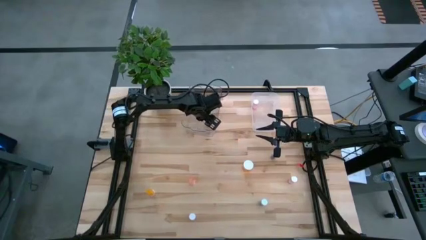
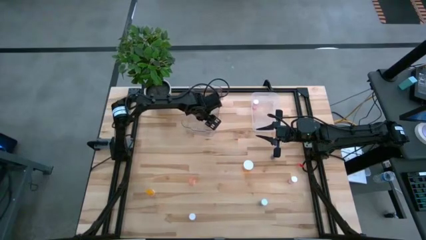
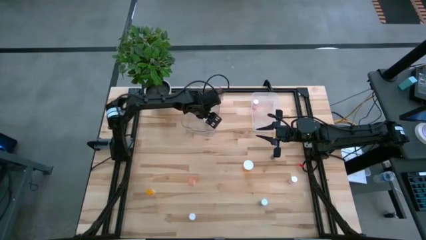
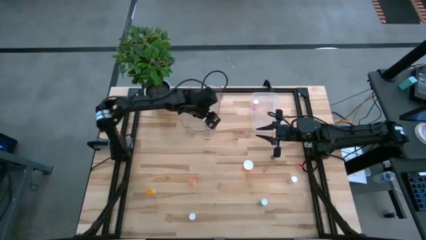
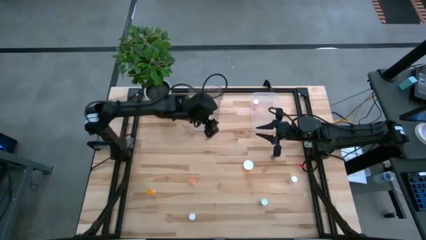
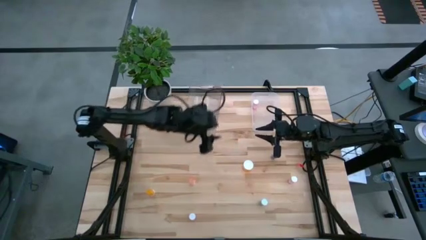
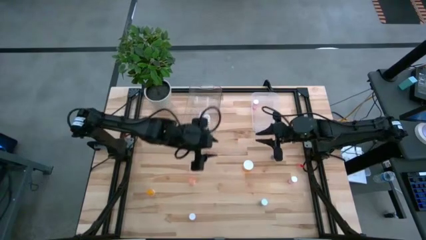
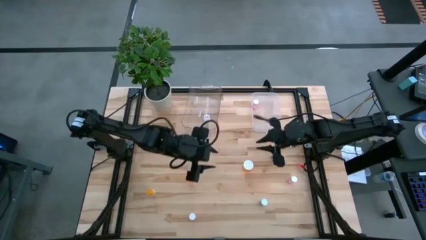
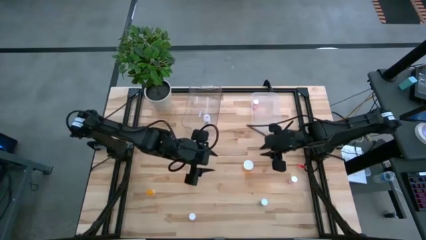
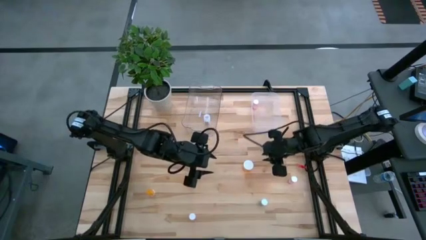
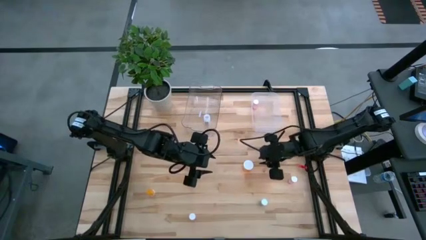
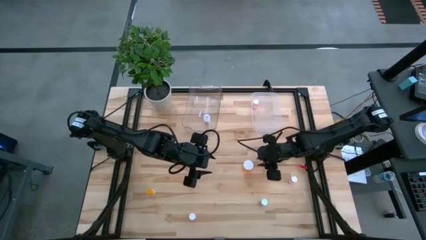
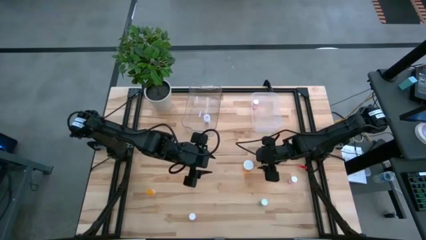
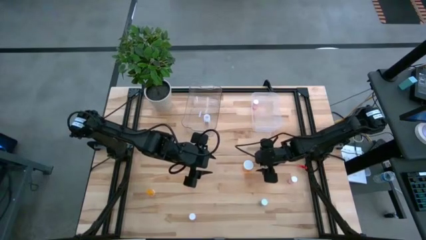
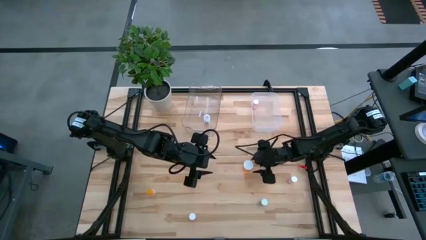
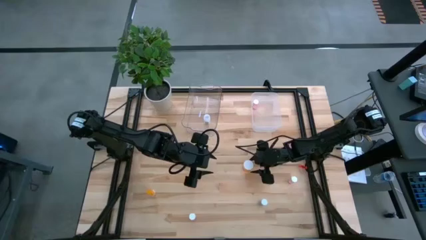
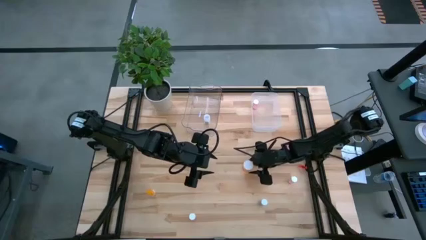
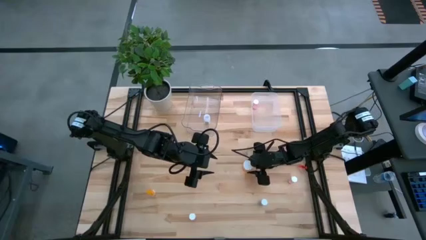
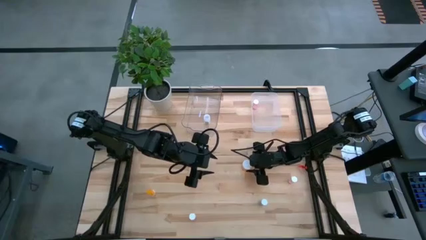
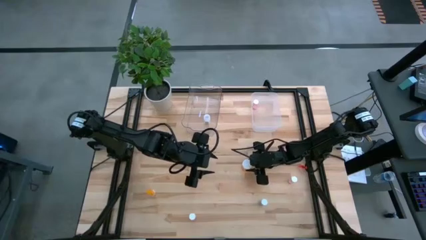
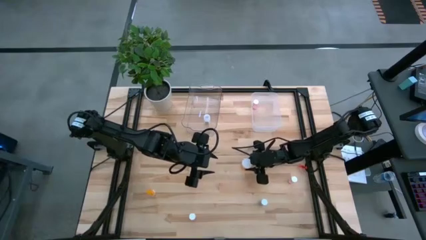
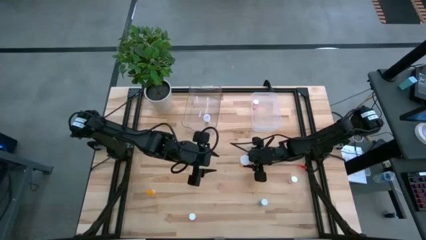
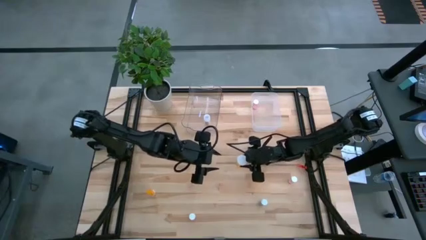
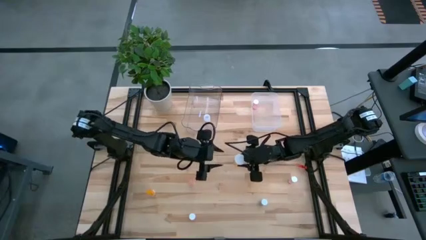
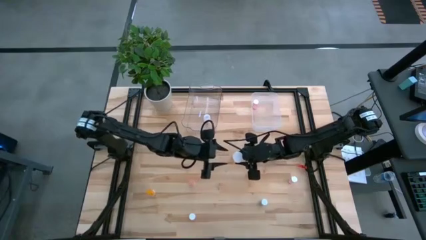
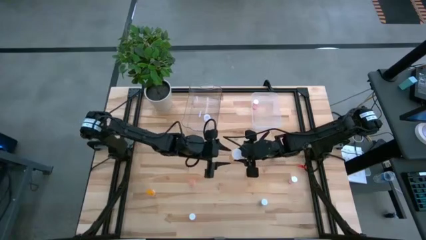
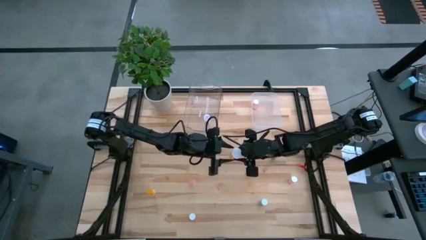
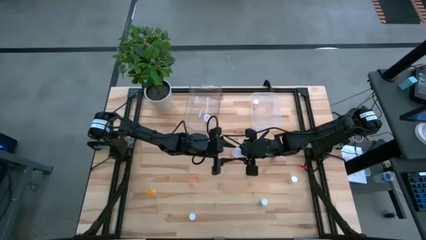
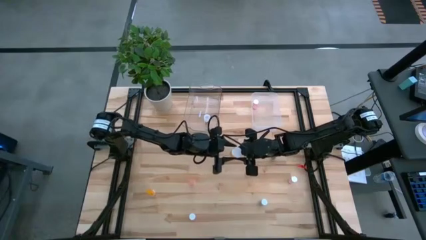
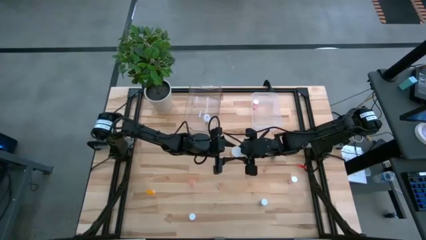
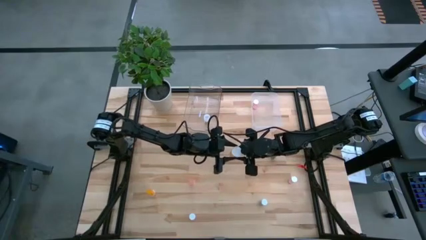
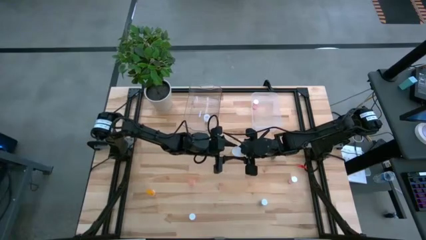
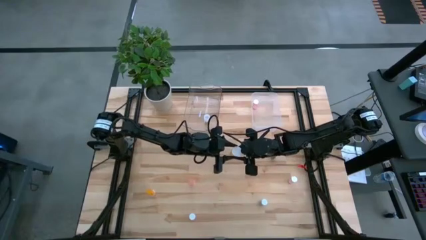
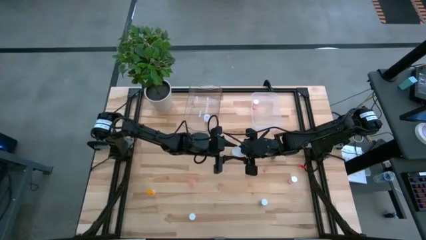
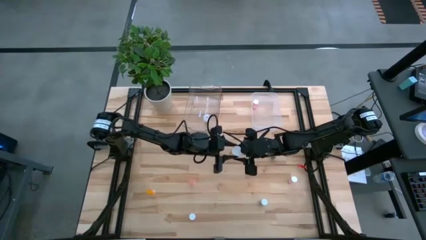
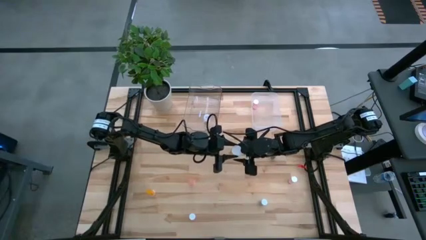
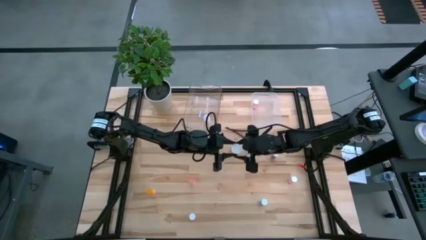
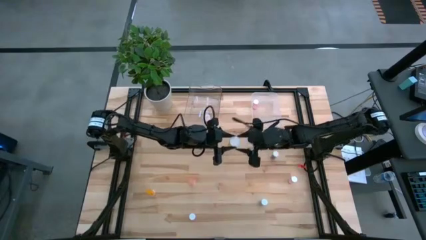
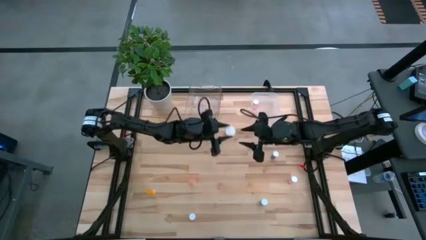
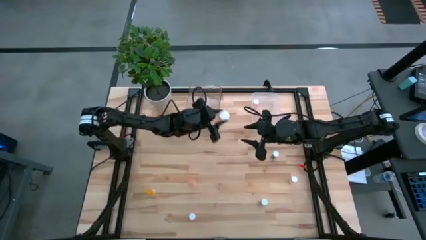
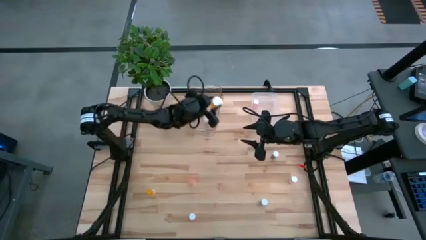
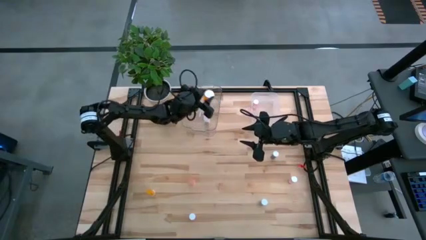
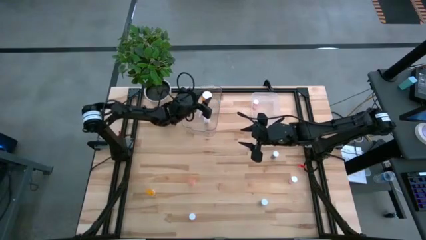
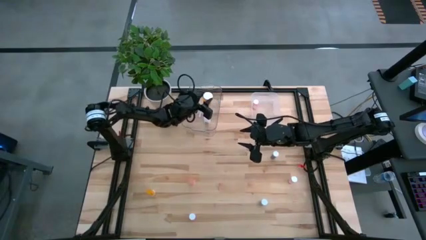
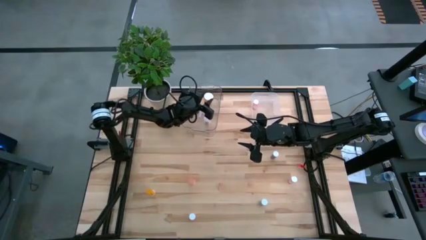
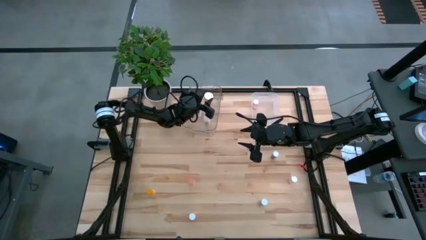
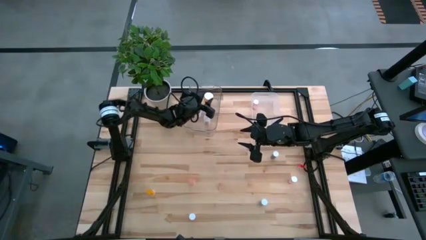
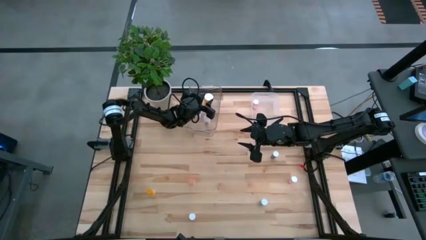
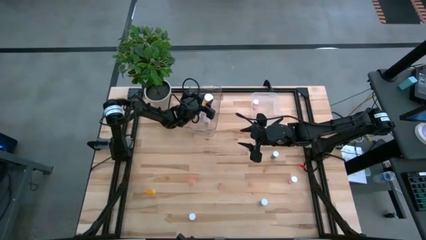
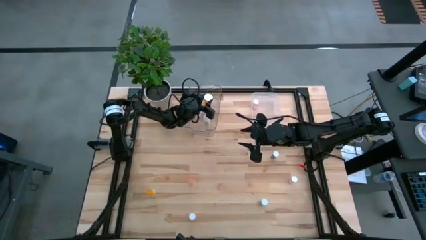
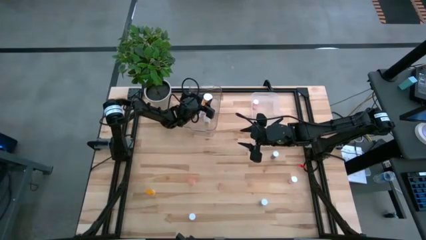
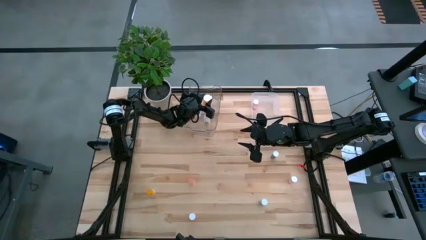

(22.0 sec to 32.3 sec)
Task: Pick and place medicine bottles into bin by pill shape (circle, oval)
Put the orange capsule pill bottle into the left transparent bin
